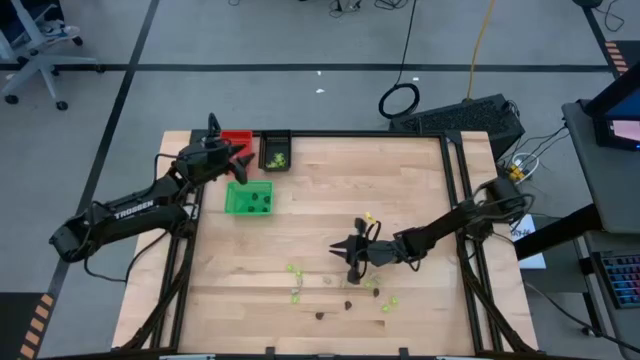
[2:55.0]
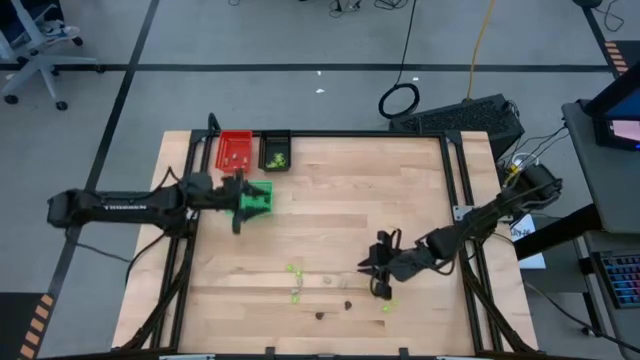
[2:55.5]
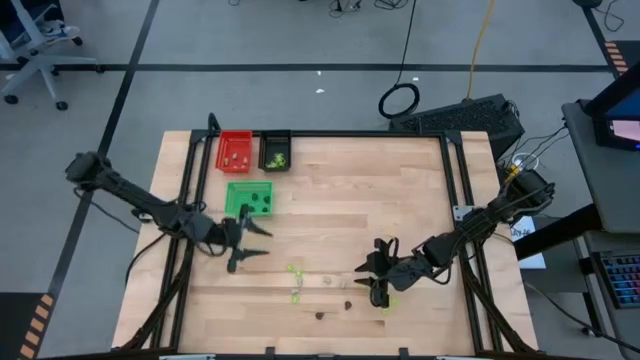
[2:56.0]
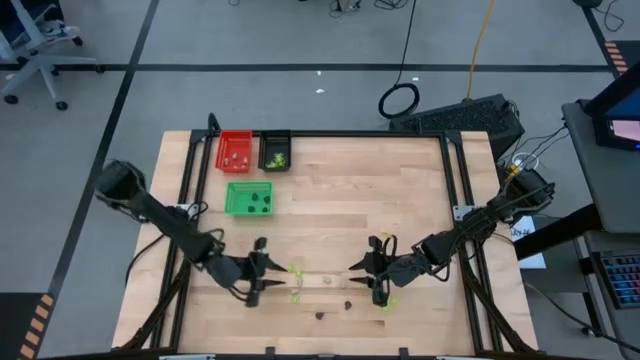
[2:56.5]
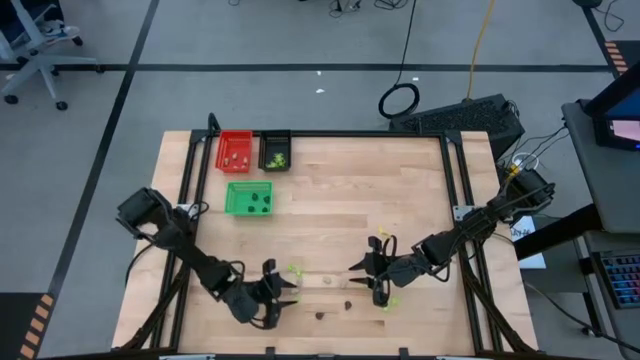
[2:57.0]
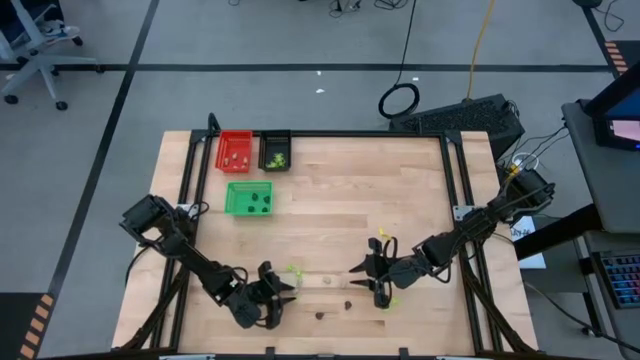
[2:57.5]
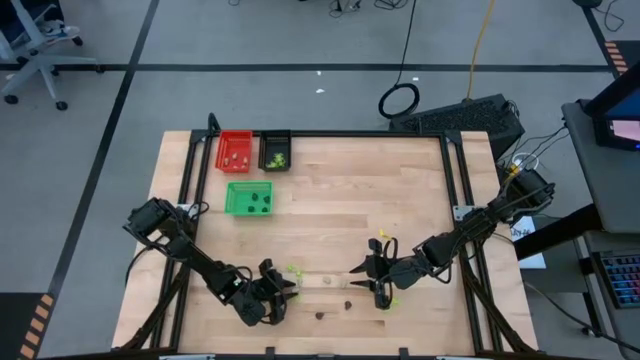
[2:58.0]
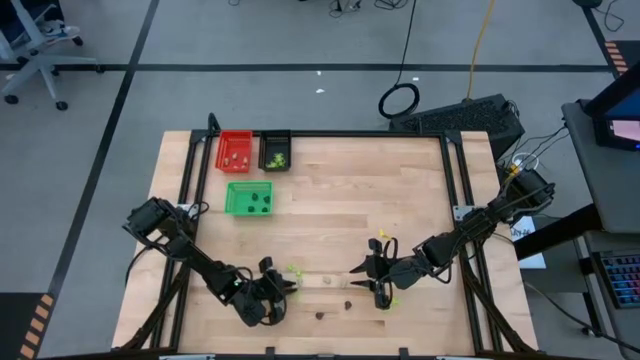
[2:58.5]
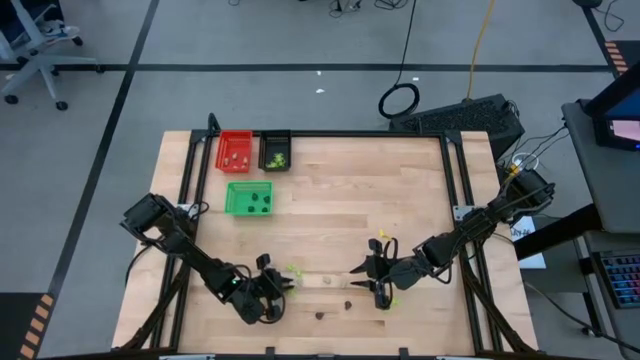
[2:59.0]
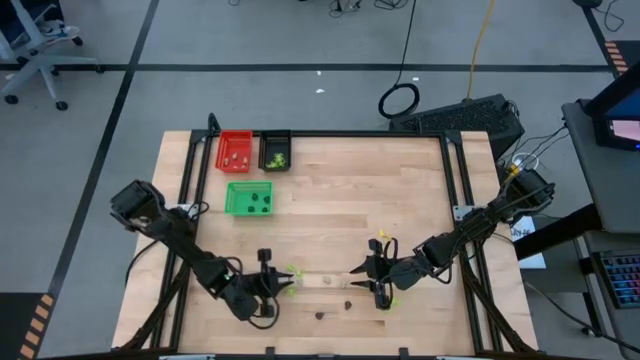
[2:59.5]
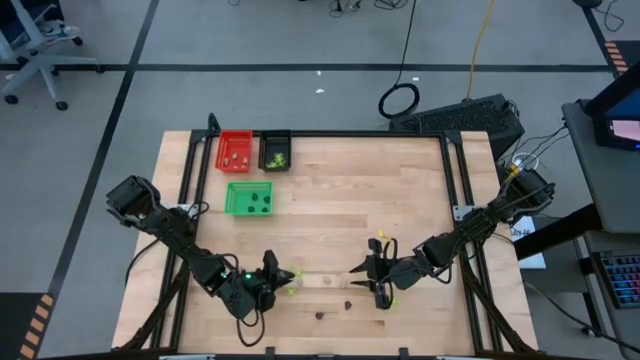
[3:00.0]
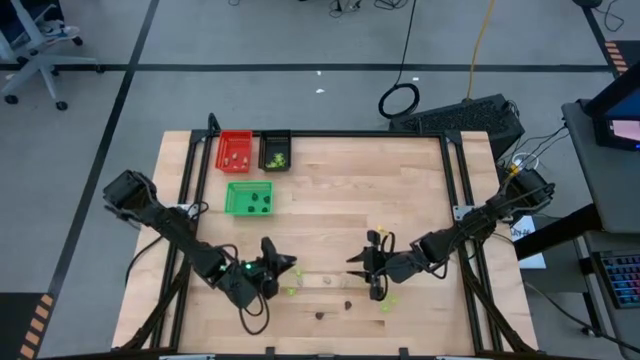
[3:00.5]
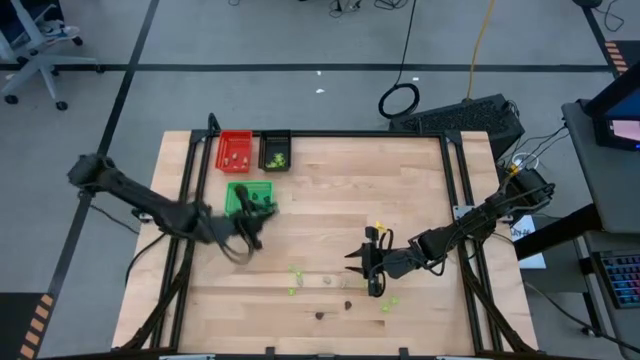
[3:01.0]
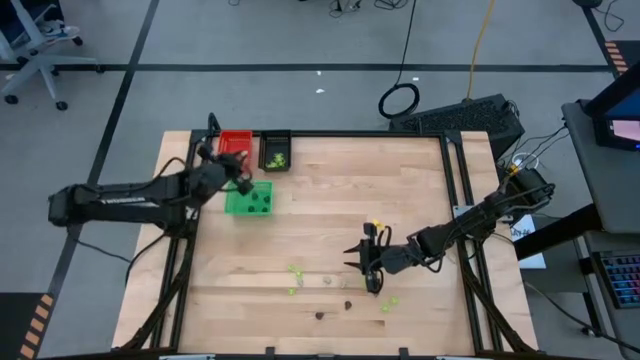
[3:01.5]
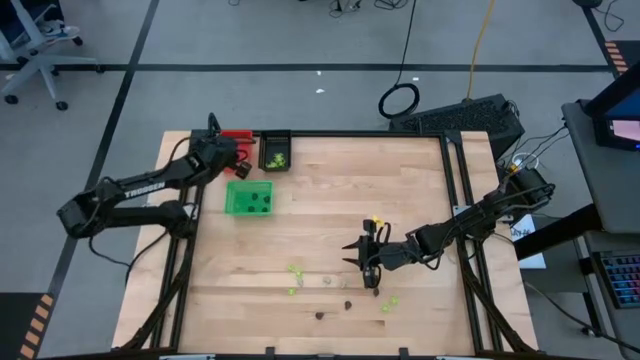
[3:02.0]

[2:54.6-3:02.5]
Task: Sort Halloween decoration
Put the white skull toy into the red bin

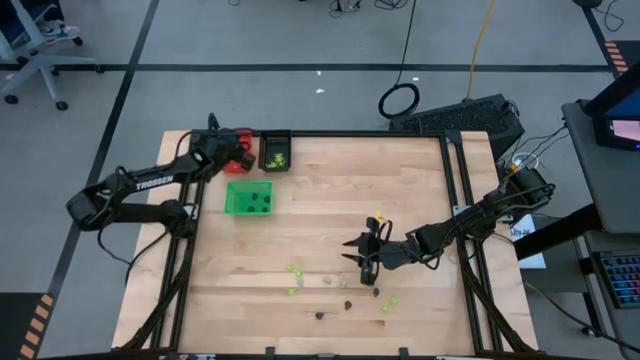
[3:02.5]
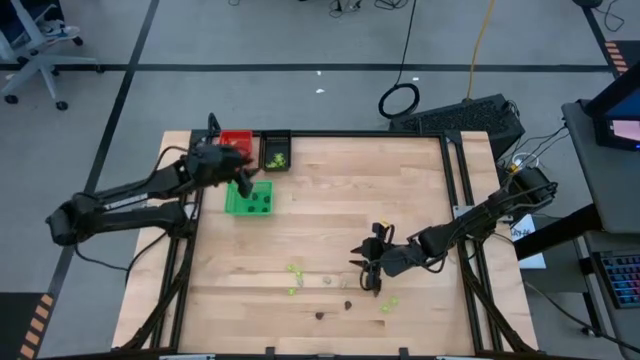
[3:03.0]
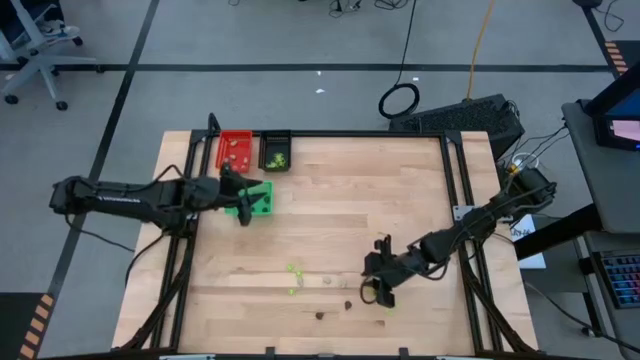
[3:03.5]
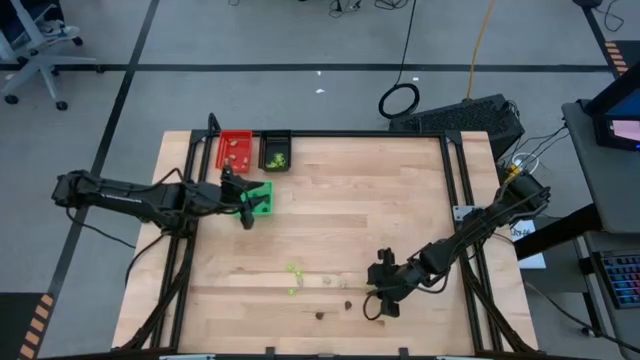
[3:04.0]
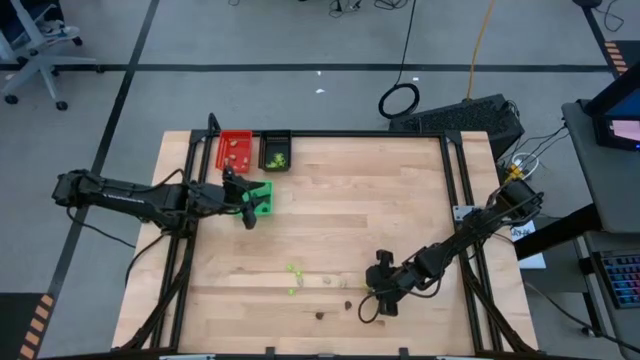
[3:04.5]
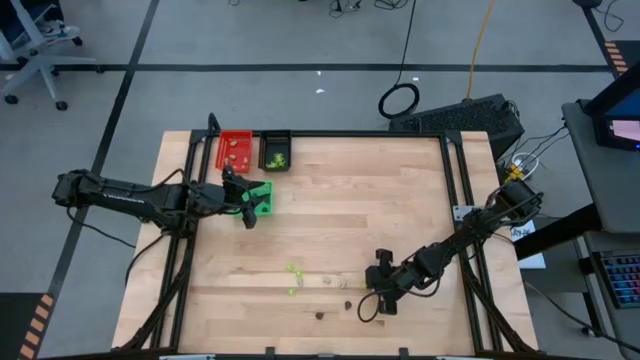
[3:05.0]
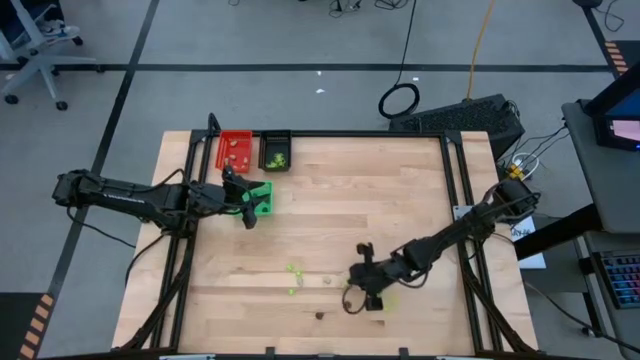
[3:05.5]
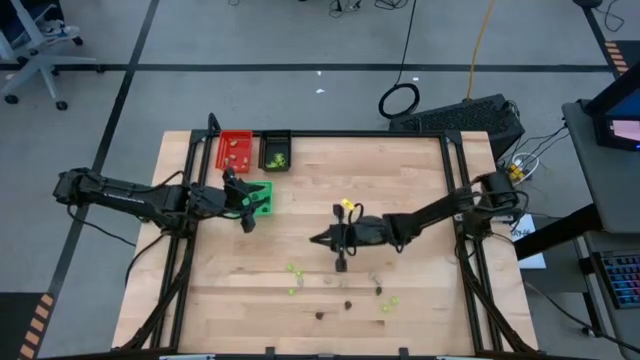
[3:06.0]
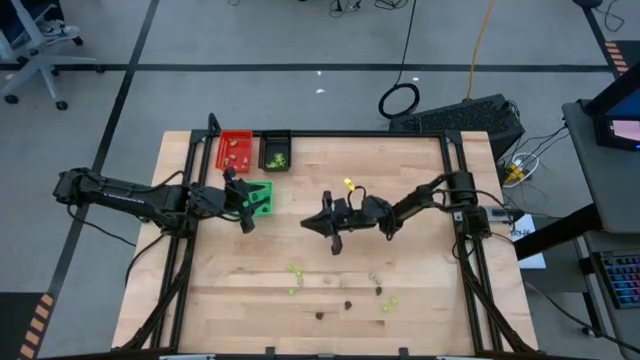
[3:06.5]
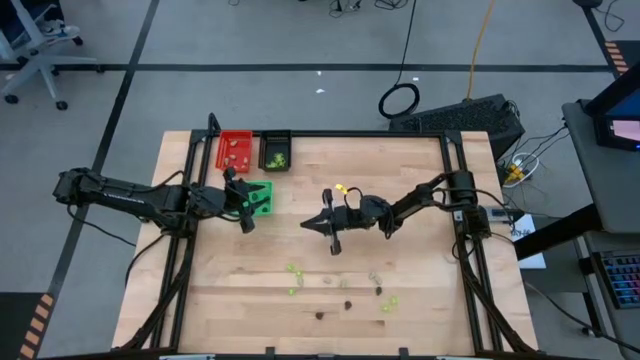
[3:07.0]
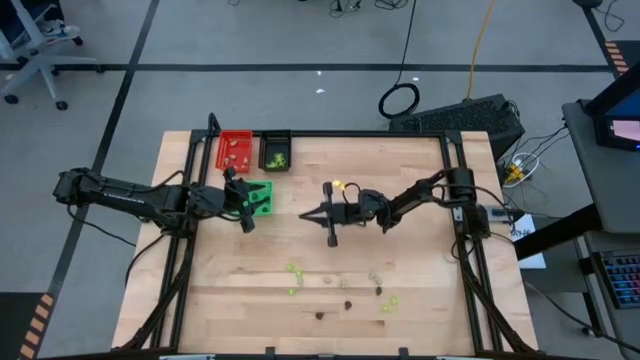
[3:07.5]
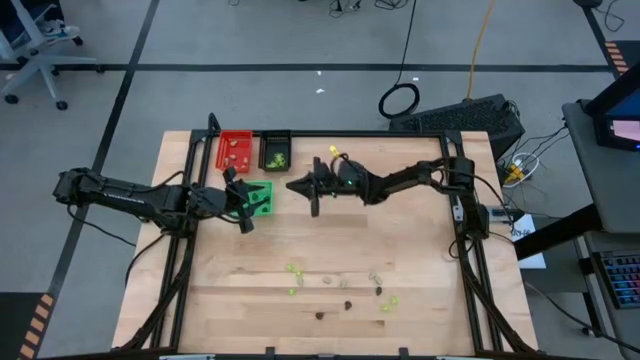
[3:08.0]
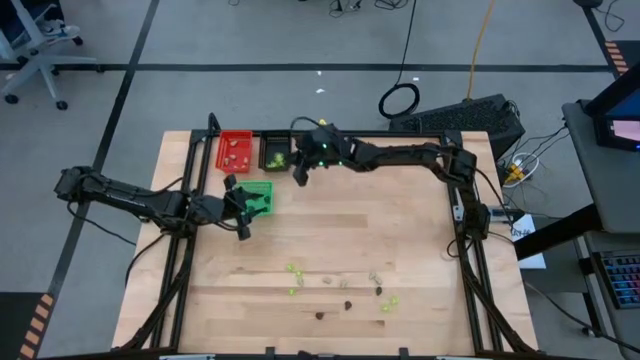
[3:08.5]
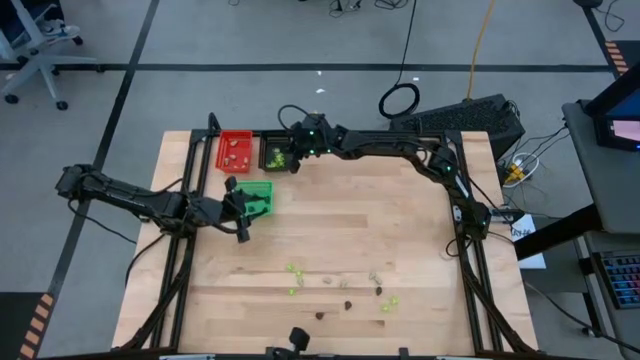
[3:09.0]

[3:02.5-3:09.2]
Put the green spider toy into the black bin

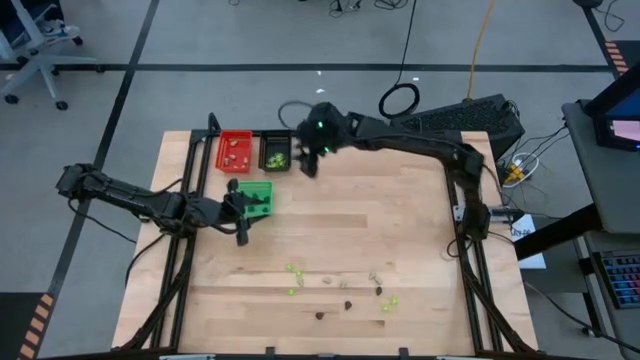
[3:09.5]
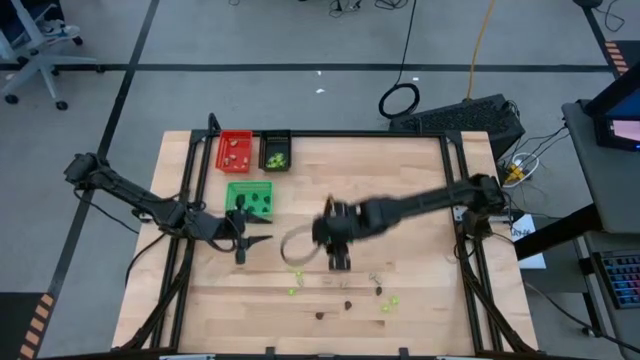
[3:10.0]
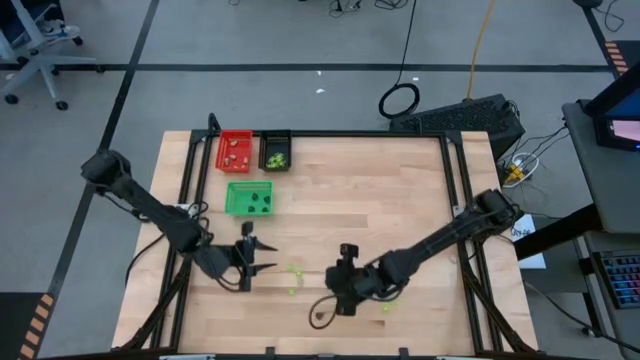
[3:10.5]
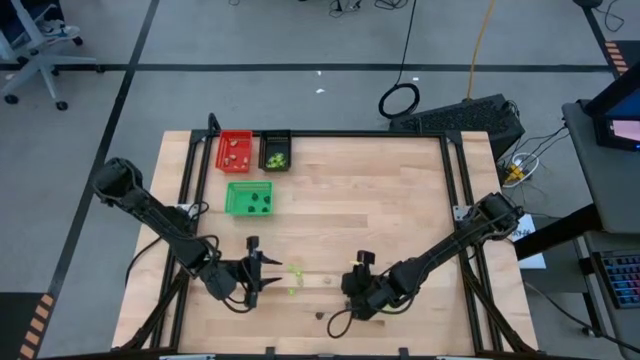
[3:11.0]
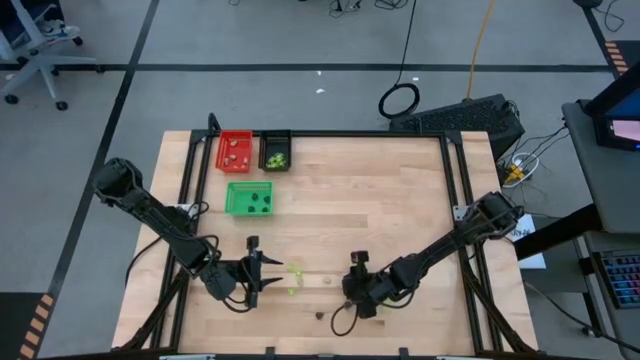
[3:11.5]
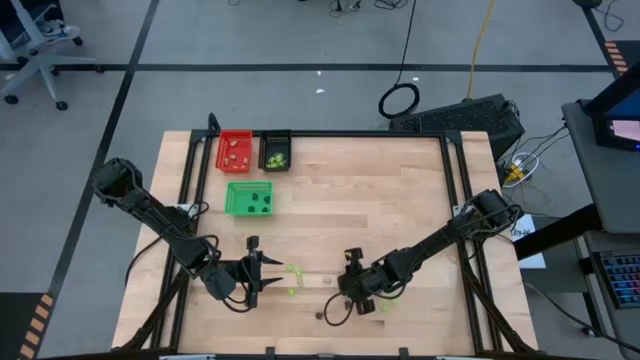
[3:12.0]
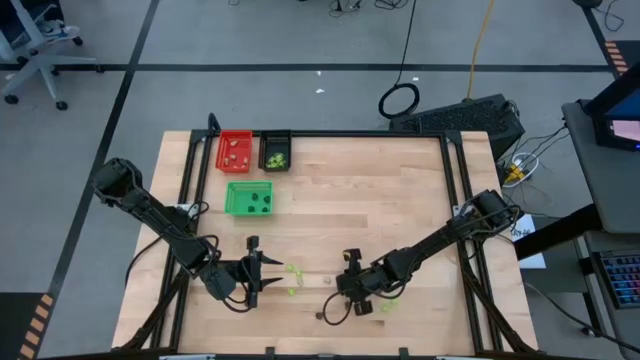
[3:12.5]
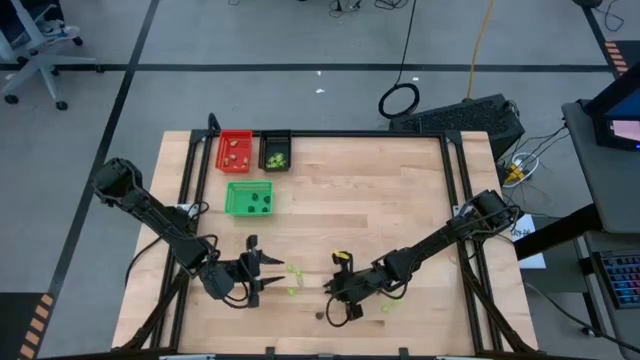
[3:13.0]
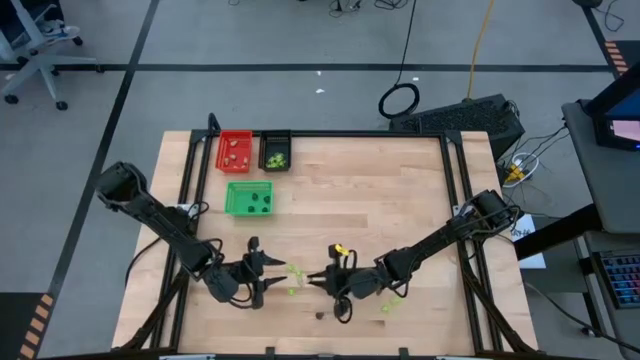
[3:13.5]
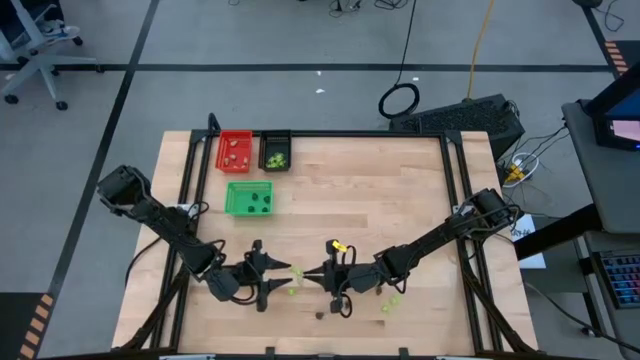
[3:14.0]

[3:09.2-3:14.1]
Put the white skull toy into the red bin

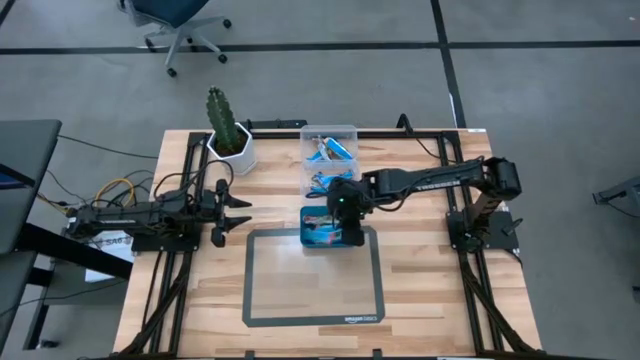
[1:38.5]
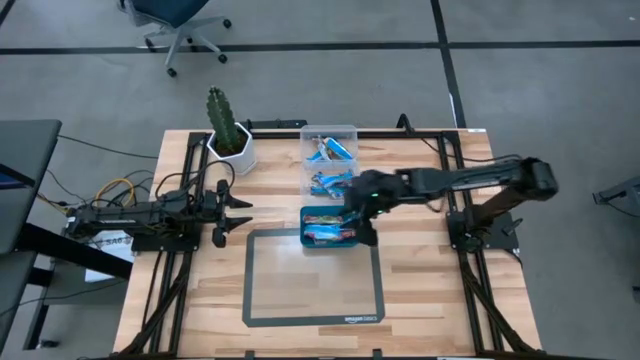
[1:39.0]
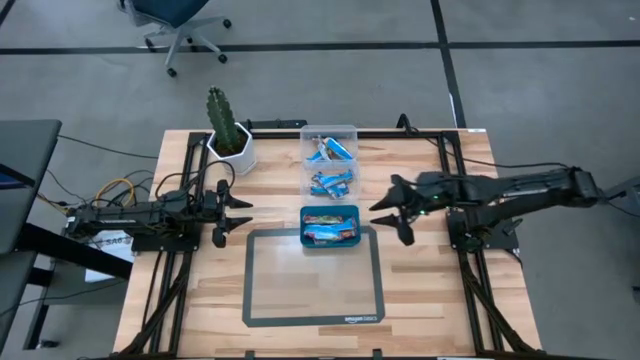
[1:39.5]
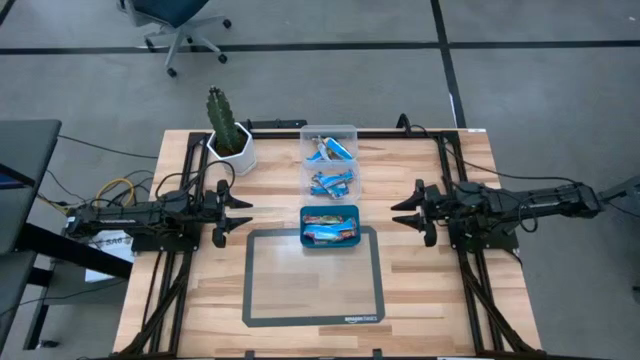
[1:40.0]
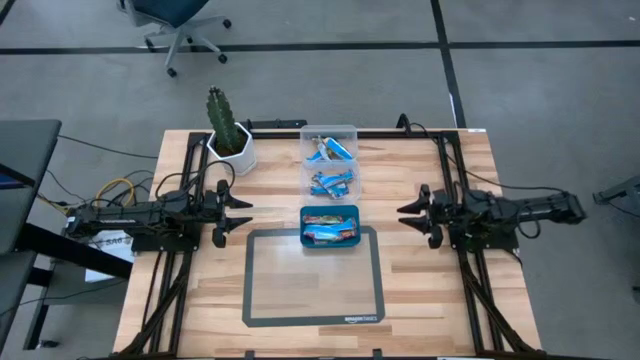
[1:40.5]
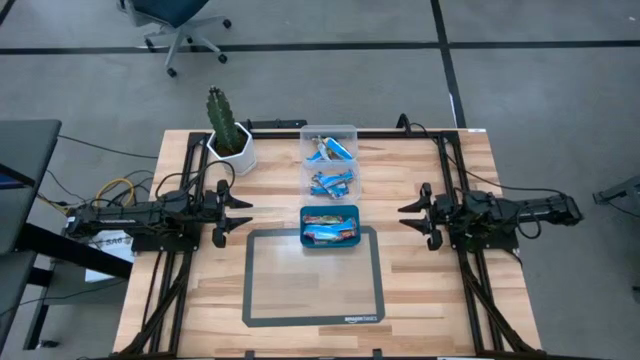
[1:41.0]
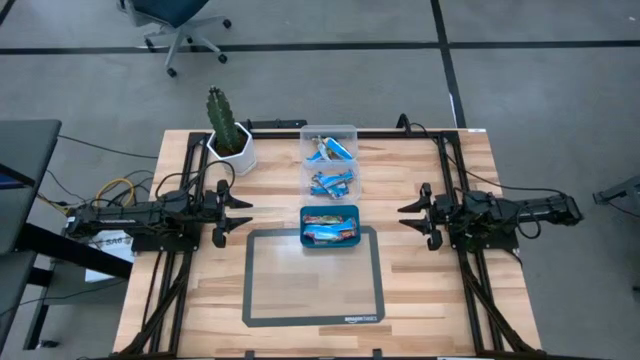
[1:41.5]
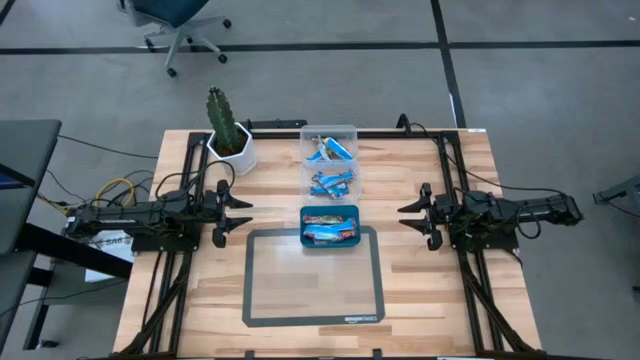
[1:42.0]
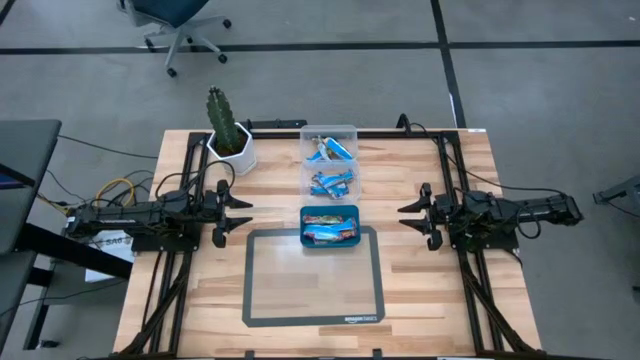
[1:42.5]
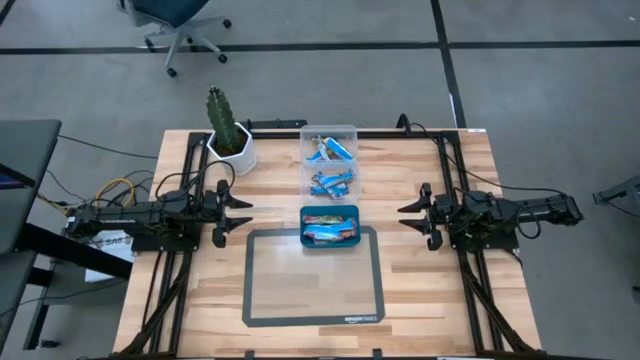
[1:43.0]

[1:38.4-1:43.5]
Task: Pick and place Granola Bars by type
Return to Home Position
